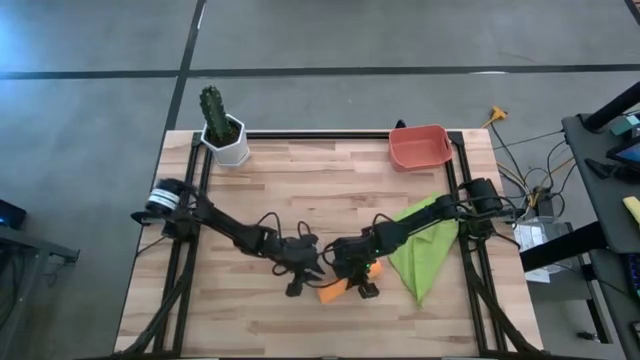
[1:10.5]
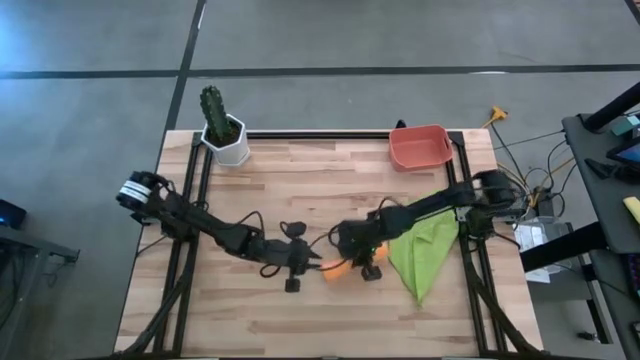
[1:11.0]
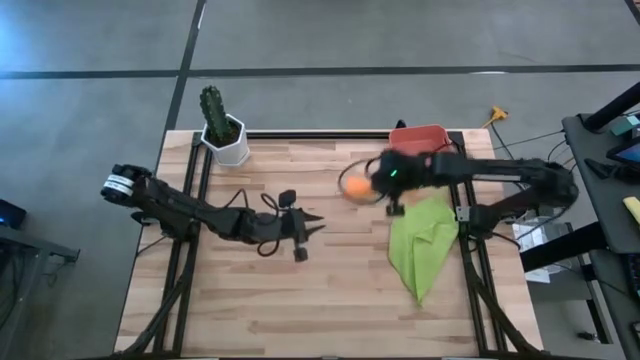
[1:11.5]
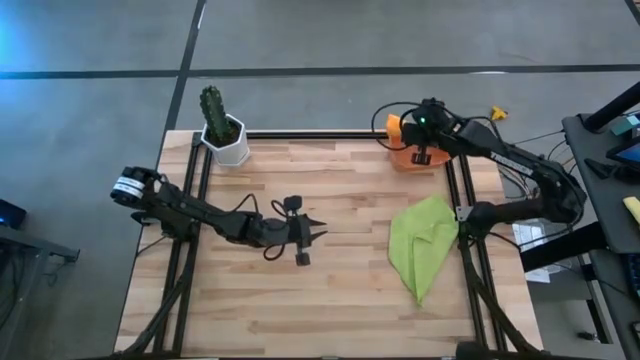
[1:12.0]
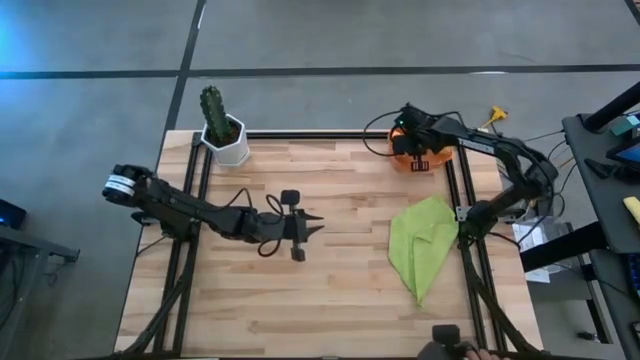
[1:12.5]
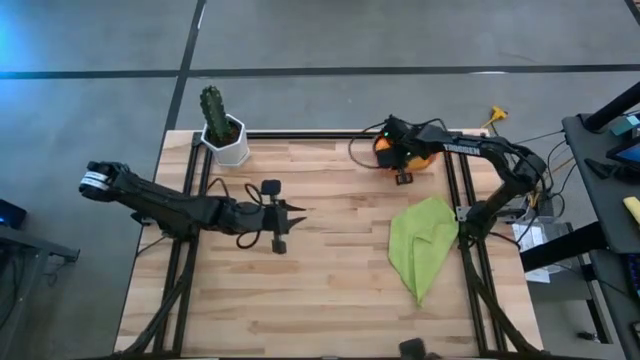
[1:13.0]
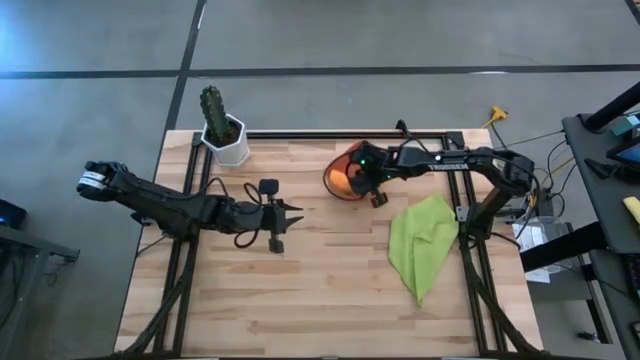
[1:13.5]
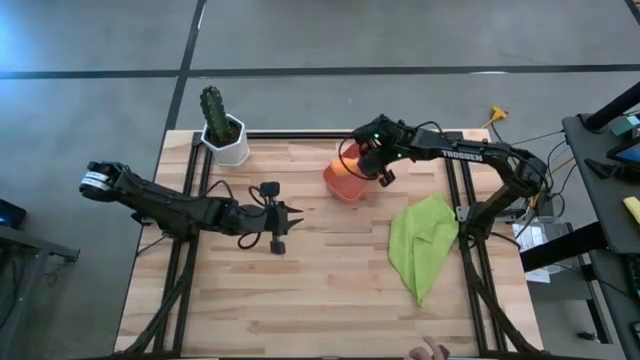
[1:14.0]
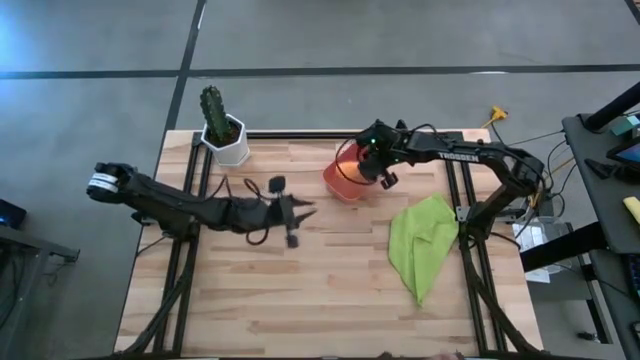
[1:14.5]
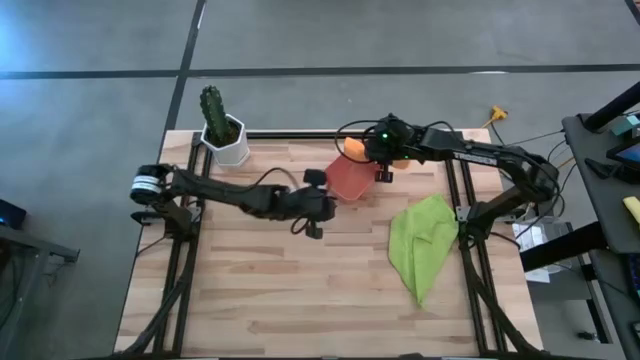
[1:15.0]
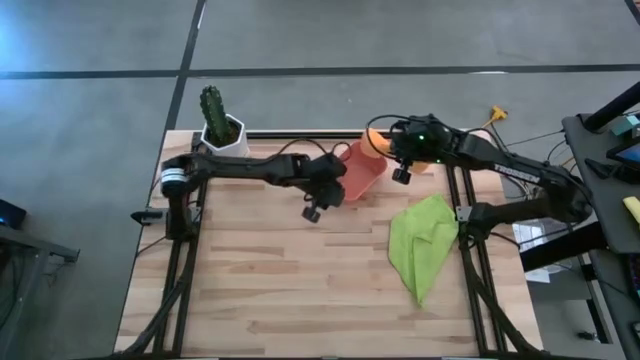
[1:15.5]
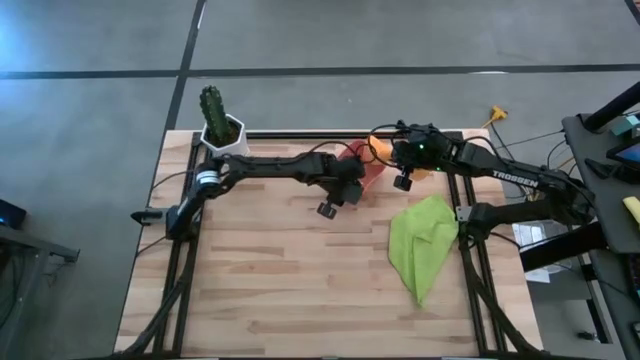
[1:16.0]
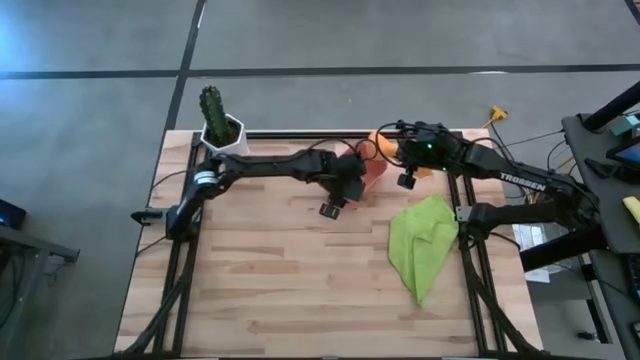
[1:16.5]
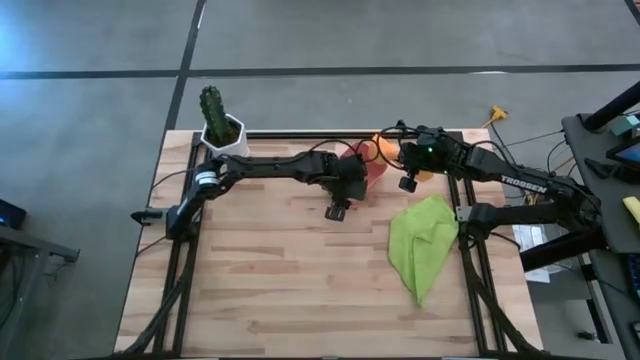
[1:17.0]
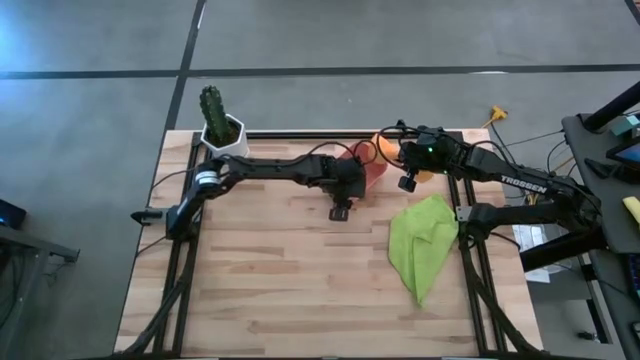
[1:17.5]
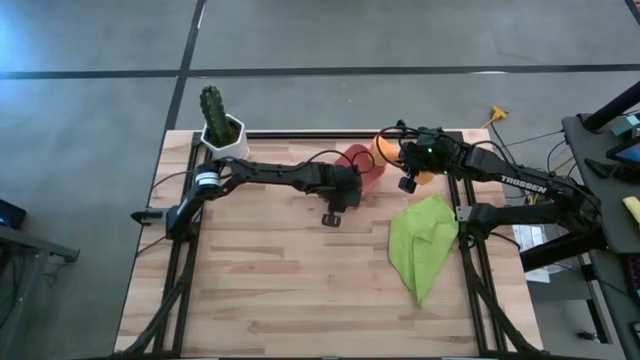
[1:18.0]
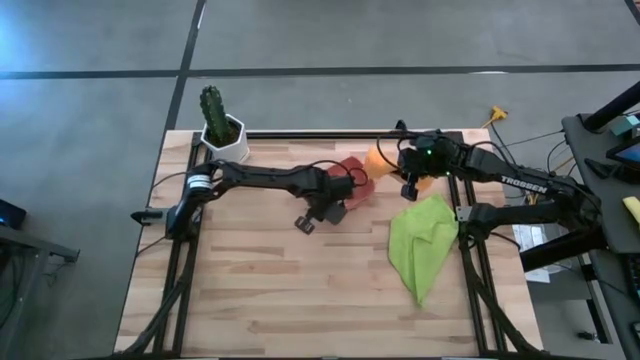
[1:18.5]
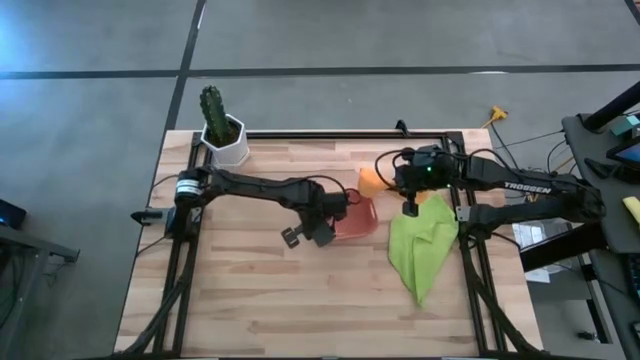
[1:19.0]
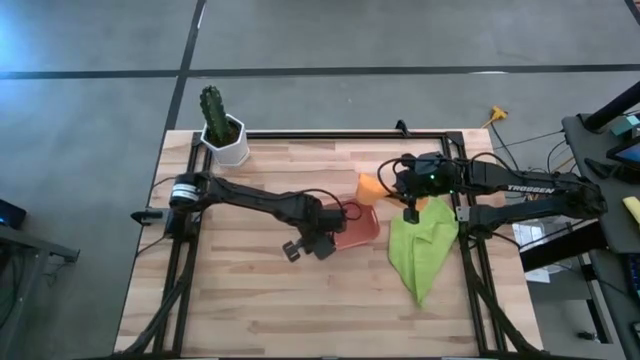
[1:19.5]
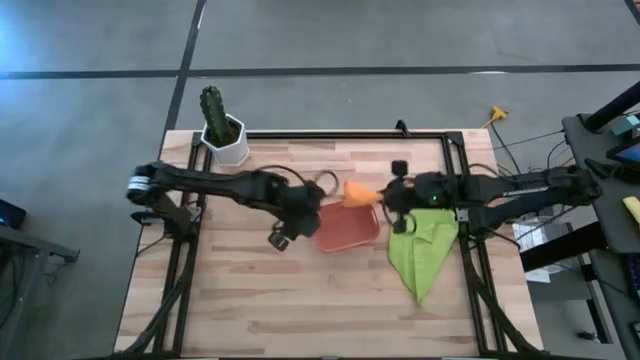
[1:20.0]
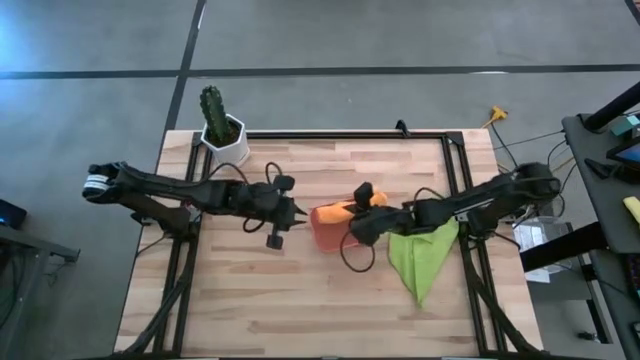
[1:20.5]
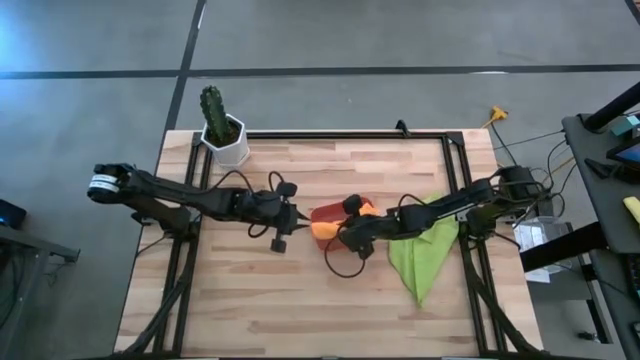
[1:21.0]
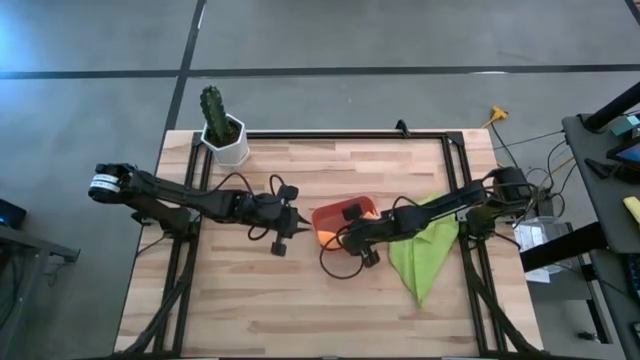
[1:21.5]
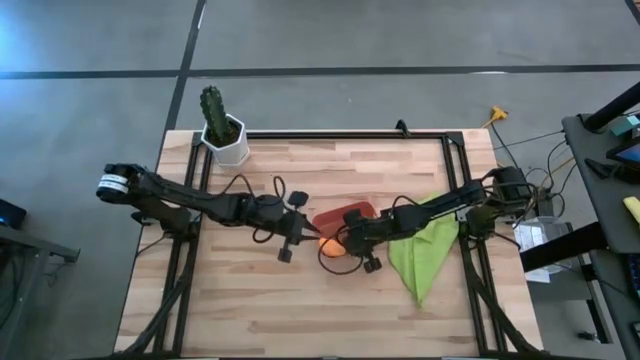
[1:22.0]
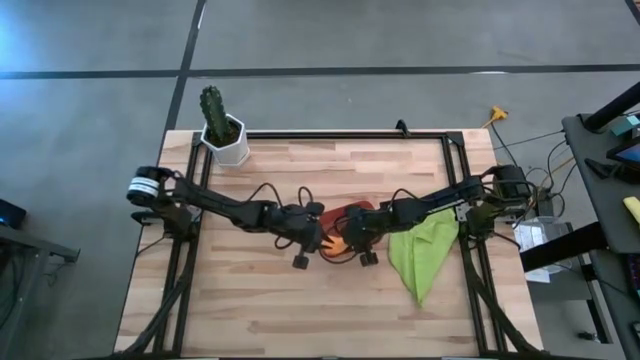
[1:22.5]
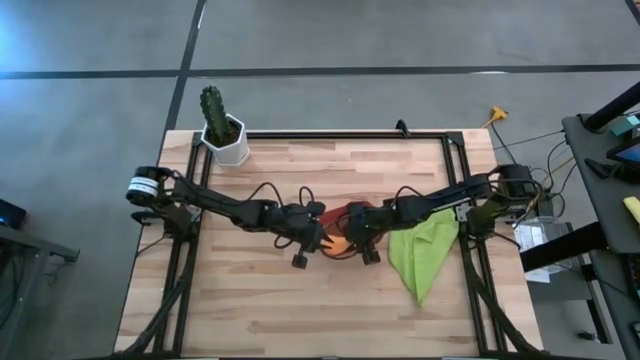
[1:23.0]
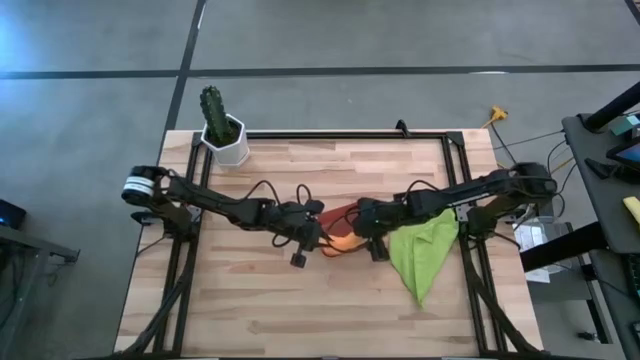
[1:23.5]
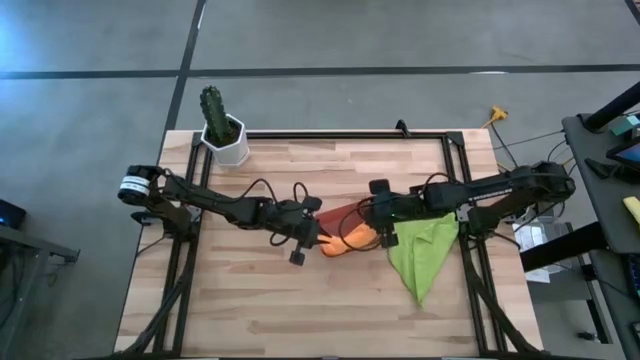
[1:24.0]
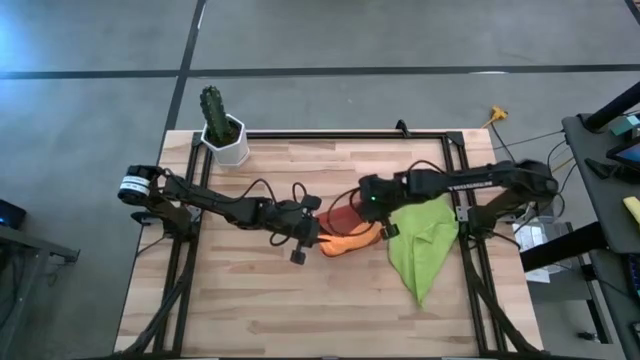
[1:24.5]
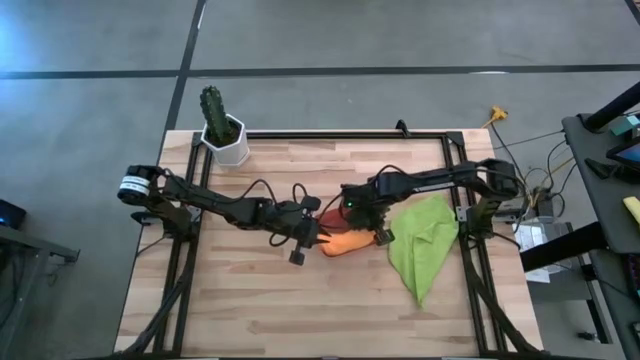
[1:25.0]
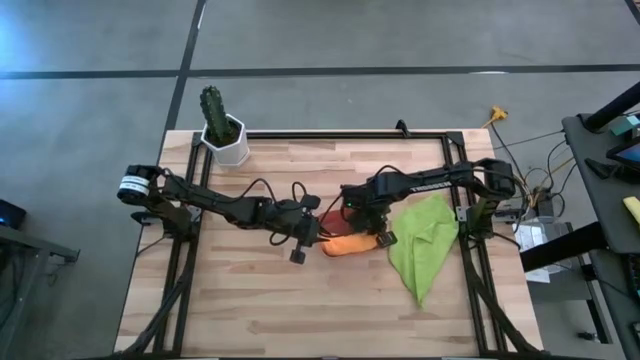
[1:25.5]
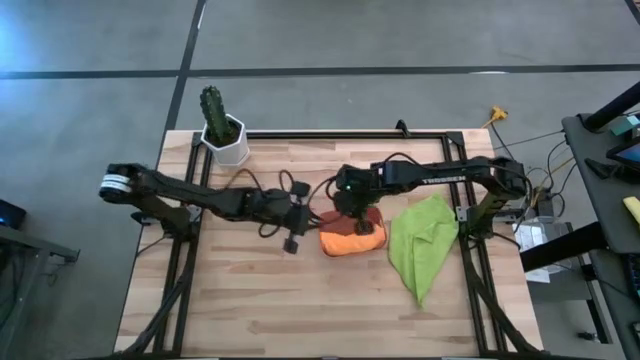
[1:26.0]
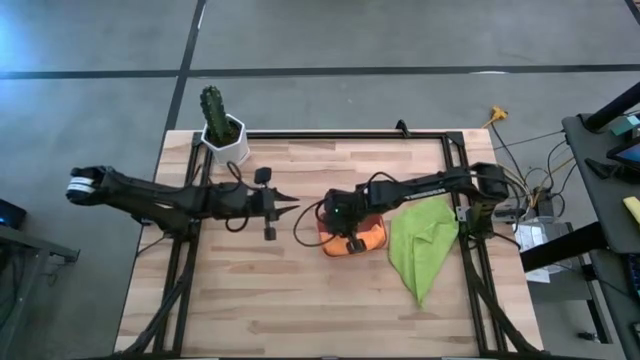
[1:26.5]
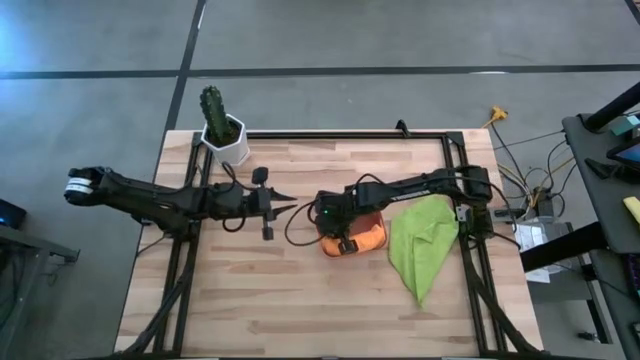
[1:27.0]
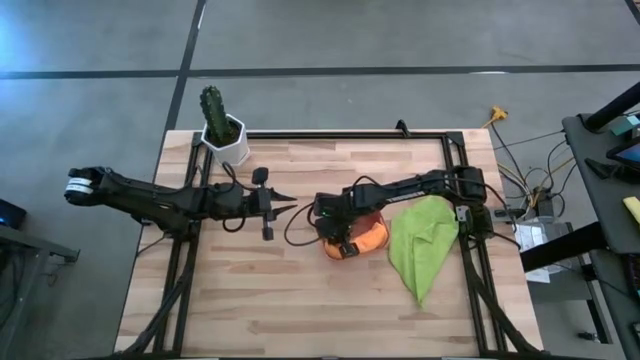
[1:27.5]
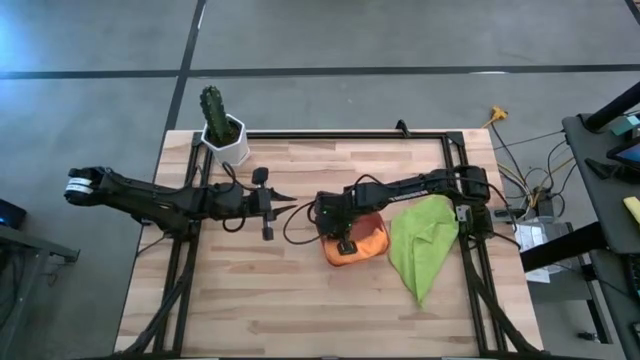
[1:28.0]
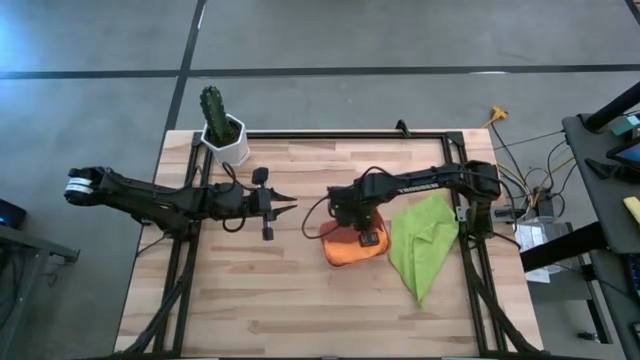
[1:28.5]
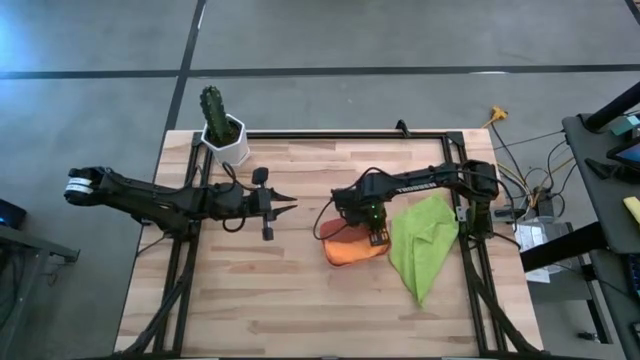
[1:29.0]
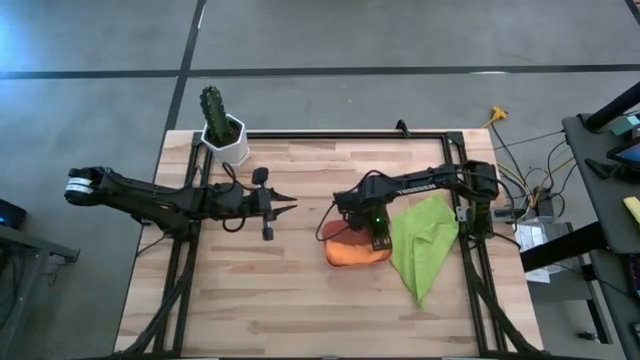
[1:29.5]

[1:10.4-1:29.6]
Task: Roll microfiber towels into tight, uniform cylinder then place into a basket
Put the orange microfiber cloth into the orange bin

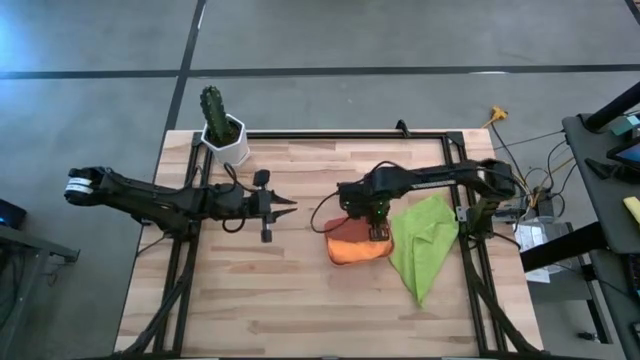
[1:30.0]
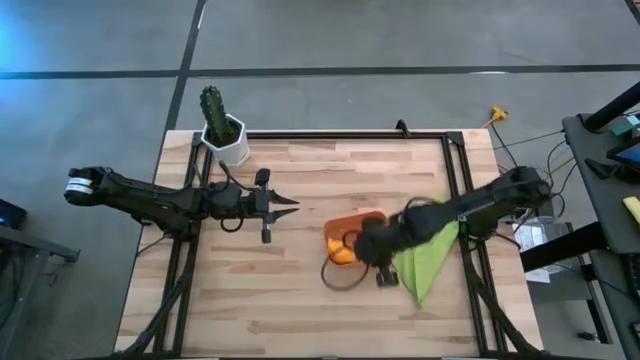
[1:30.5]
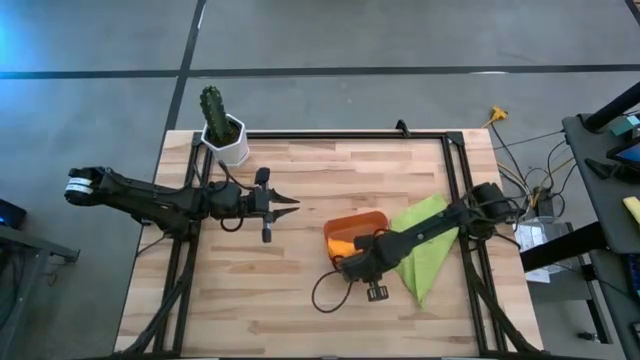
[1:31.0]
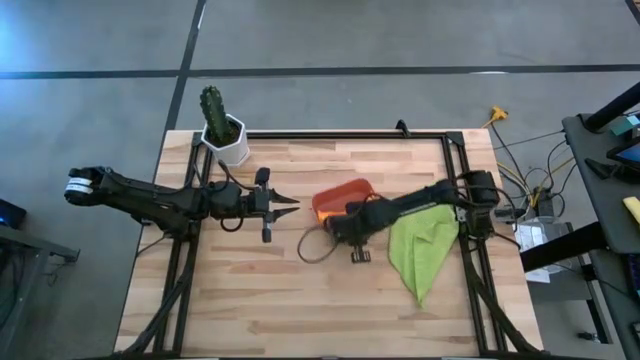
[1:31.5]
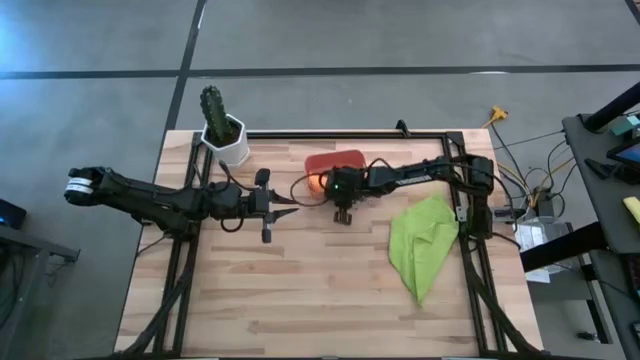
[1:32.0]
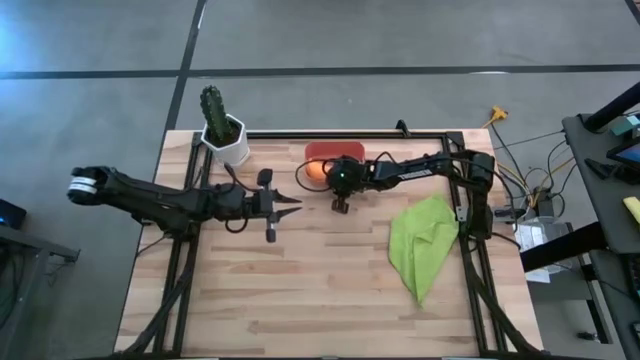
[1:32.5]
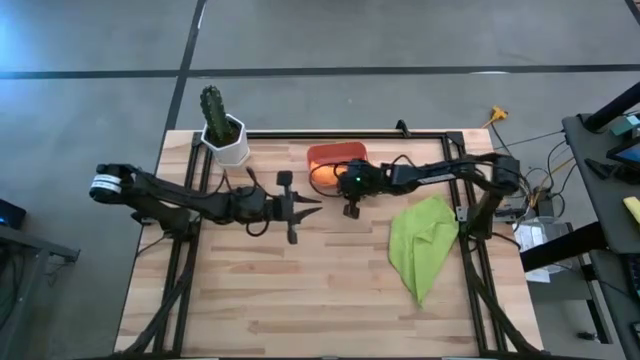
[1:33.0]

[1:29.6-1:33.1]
Move the orange bin to the top of the table
